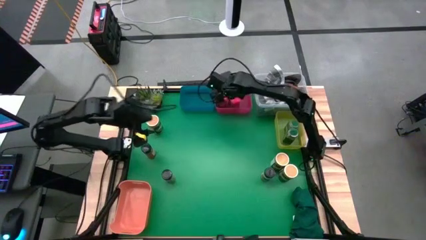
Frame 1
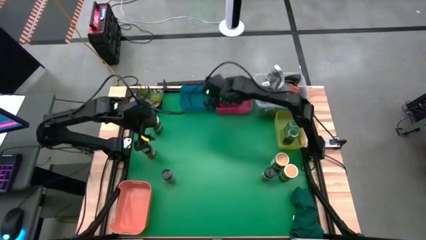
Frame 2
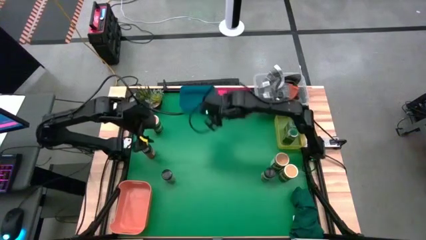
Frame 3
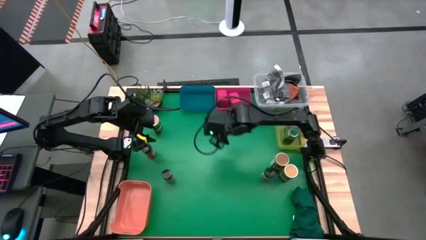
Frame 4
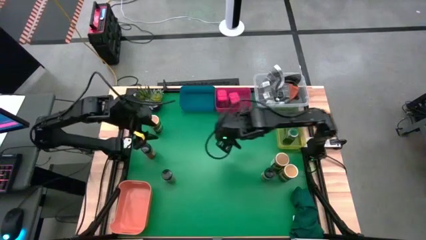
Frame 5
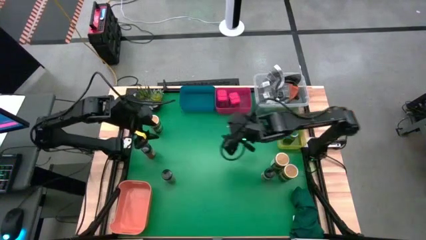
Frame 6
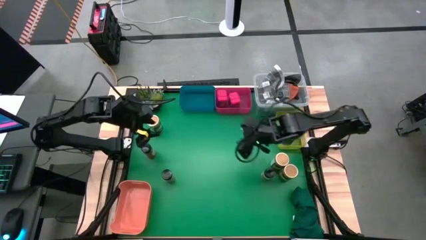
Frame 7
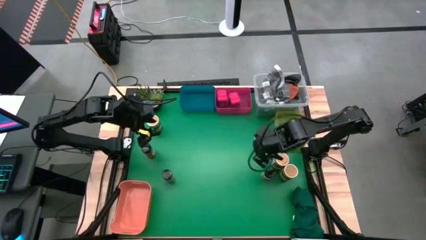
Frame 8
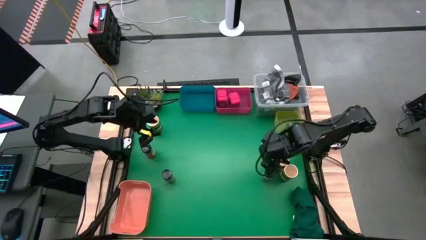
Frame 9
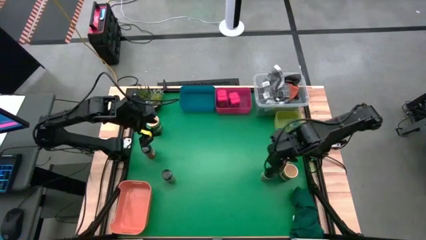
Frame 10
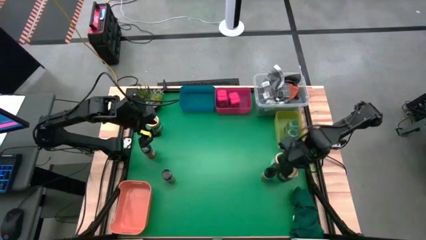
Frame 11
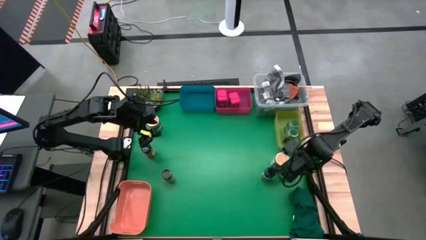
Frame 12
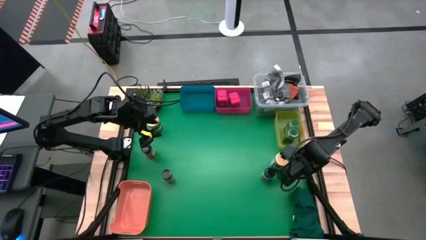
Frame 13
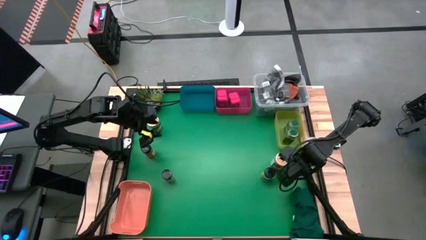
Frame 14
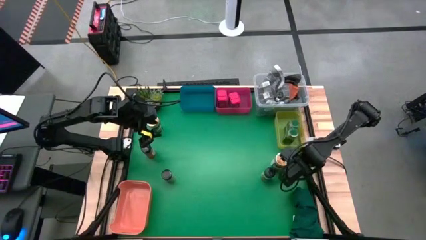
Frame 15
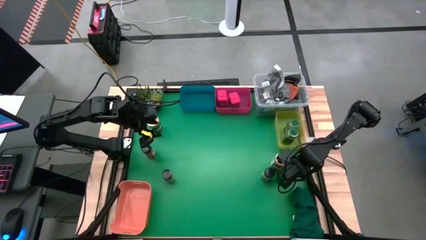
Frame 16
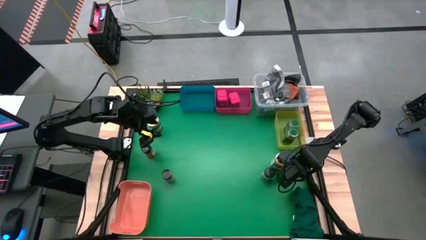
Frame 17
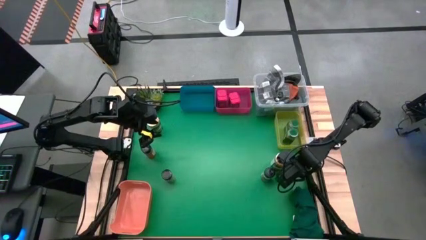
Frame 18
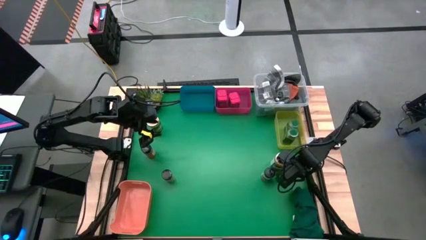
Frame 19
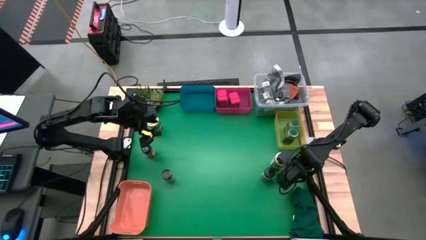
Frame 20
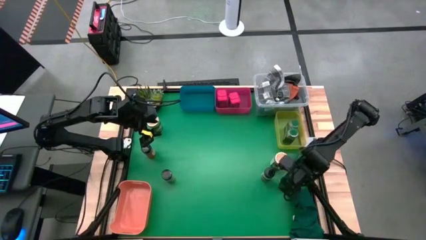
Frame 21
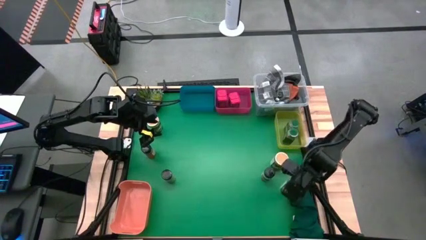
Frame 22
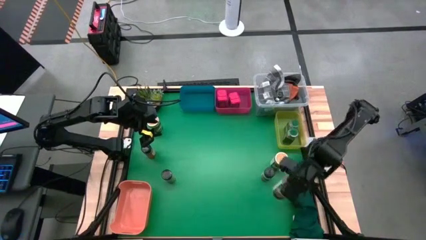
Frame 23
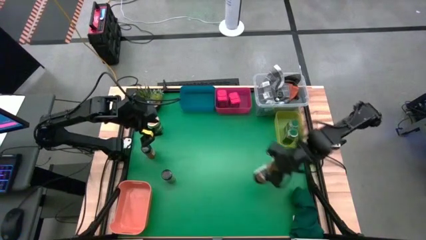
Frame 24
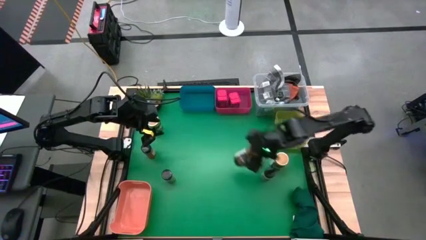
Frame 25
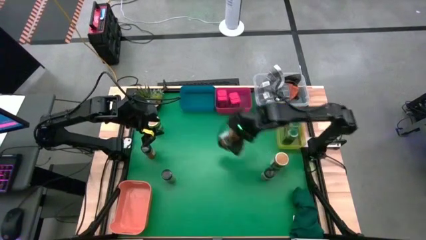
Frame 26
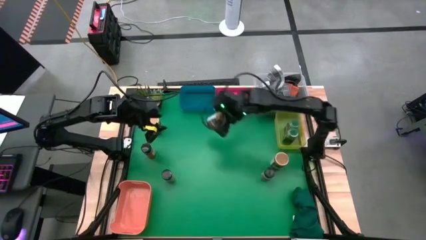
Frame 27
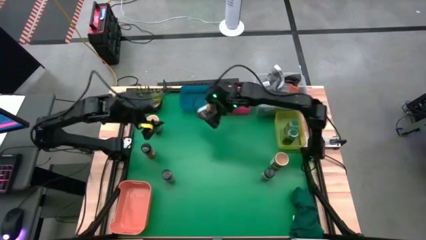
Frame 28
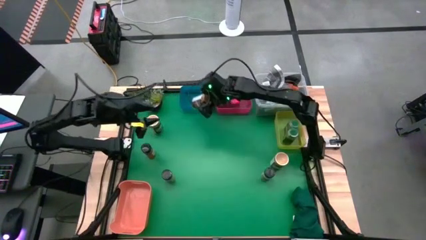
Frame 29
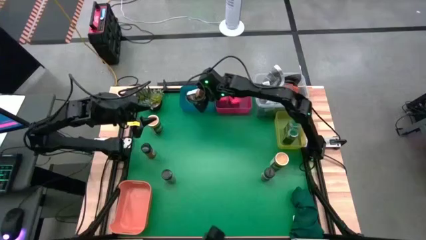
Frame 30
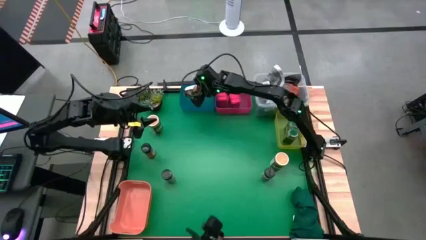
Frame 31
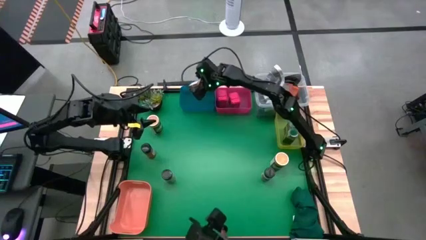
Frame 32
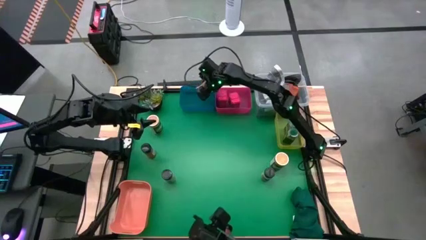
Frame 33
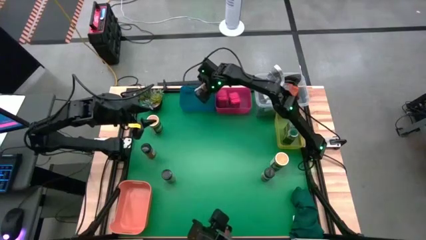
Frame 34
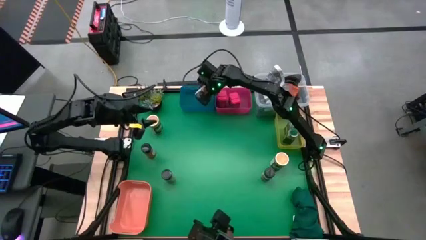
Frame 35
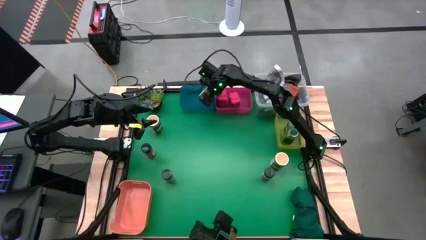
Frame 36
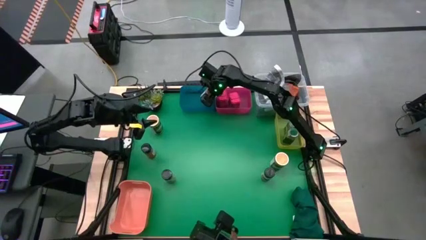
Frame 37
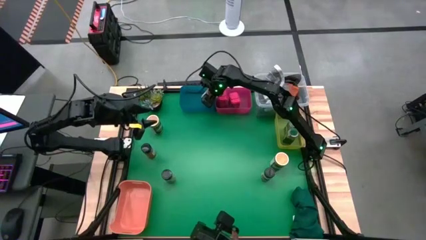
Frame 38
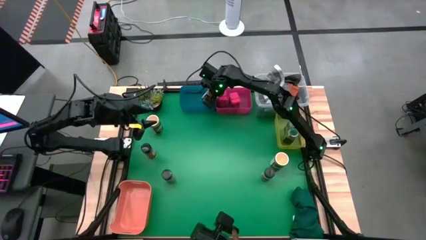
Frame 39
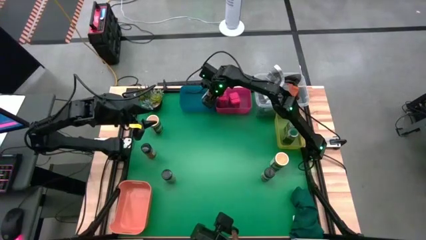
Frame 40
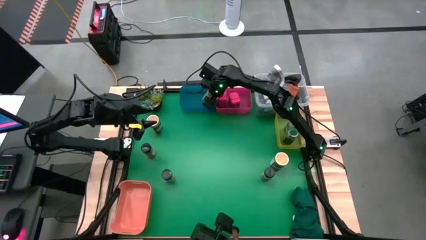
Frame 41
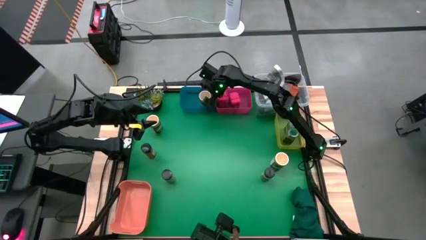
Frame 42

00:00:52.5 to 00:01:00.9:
Task: Sort spices by type
Put the bottom brown spice bottle into the blue bin

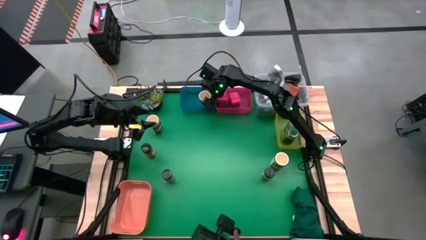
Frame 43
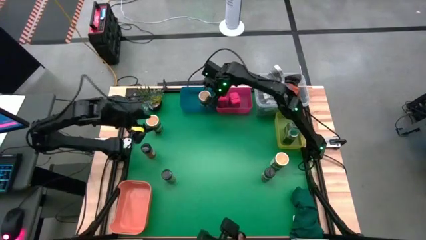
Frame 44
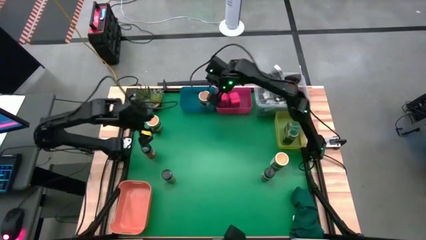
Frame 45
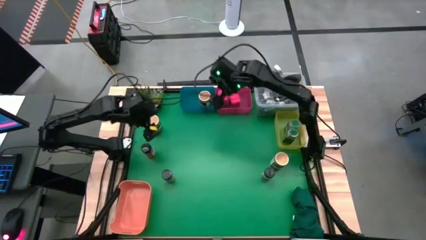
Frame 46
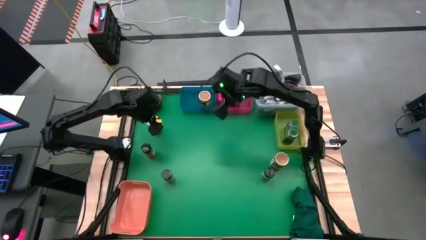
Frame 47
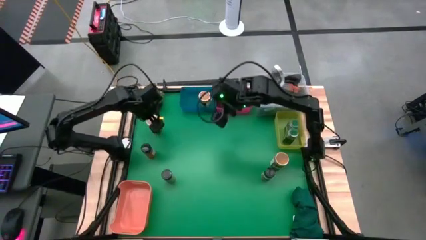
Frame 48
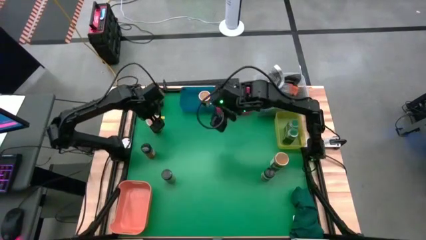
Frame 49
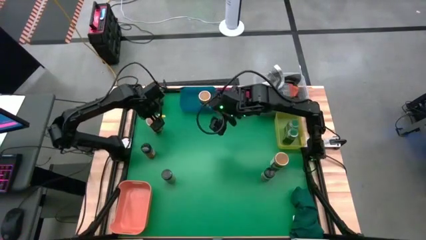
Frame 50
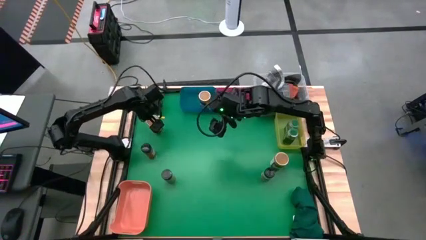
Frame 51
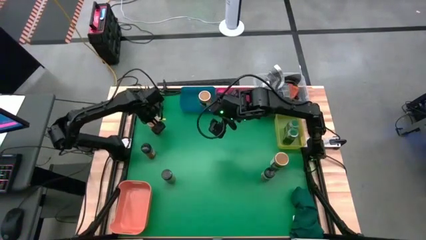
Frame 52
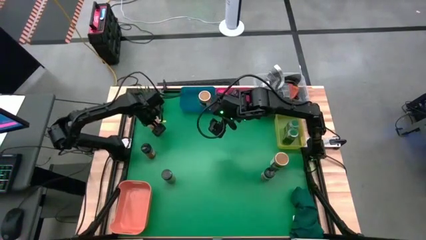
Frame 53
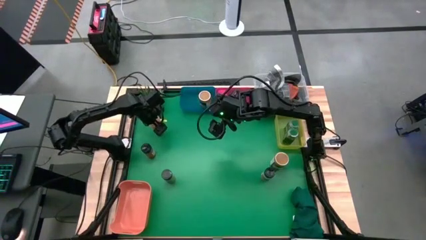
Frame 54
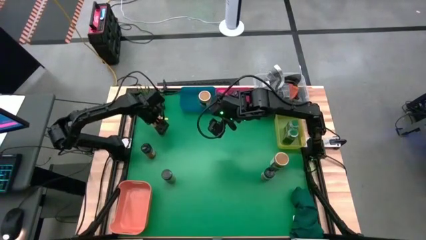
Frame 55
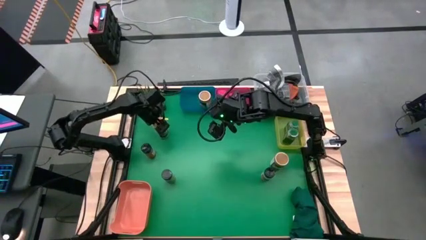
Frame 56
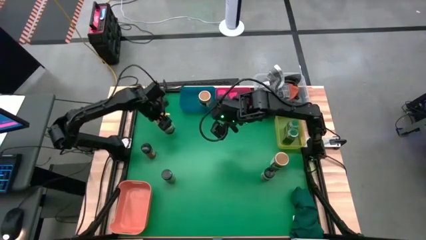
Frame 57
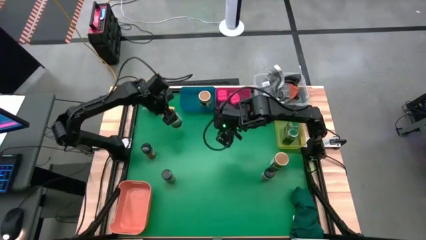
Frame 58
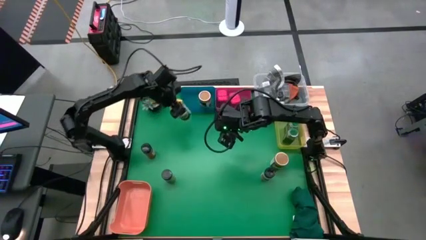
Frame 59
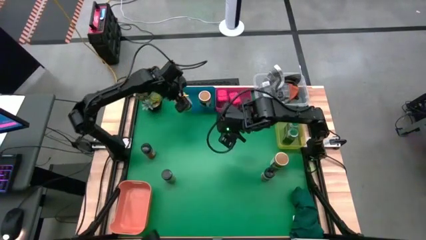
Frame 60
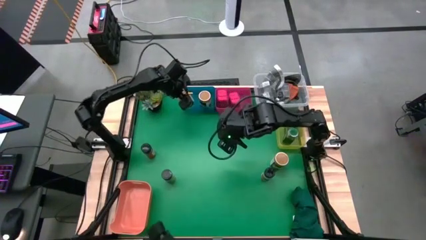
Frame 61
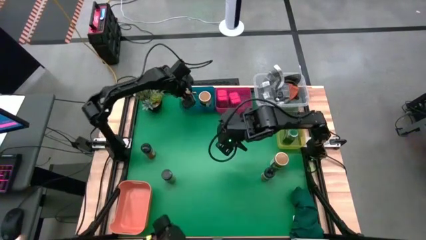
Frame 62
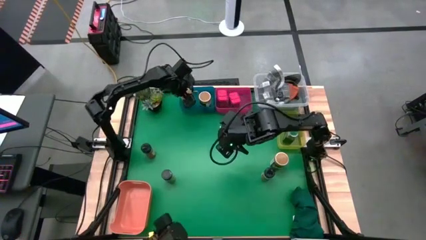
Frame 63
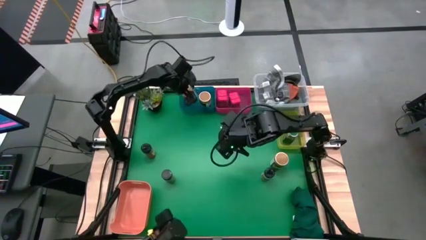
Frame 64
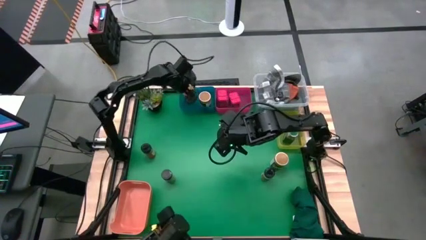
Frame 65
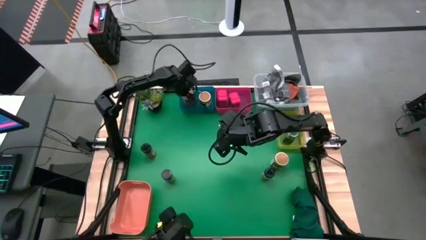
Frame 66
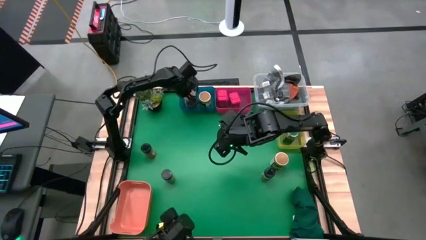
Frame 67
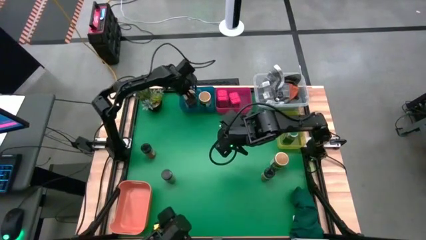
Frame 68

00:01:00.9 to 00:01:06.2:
Put the left brown spice bottle into the blue bin

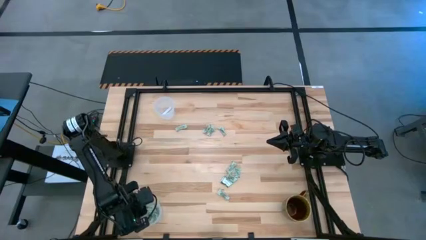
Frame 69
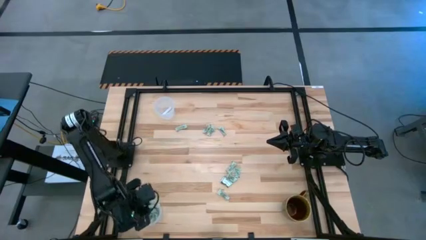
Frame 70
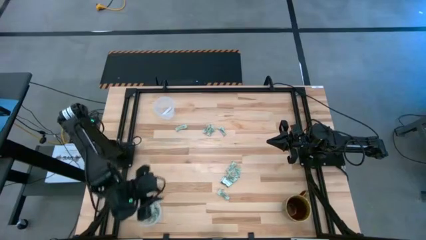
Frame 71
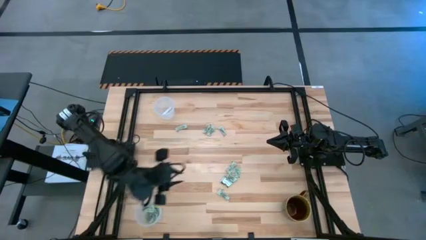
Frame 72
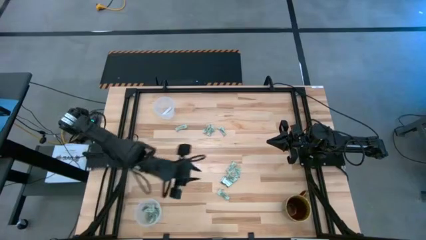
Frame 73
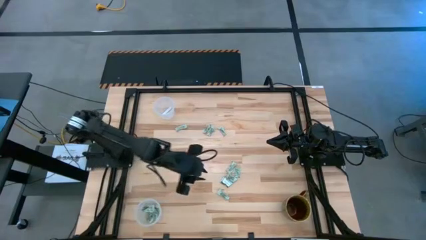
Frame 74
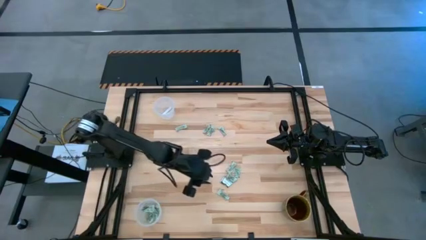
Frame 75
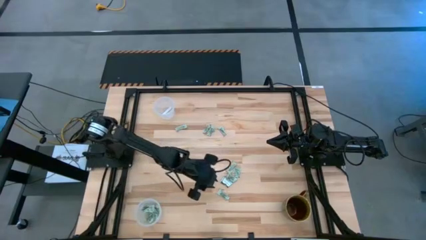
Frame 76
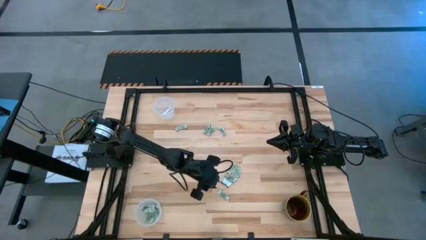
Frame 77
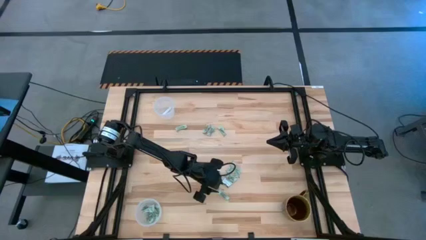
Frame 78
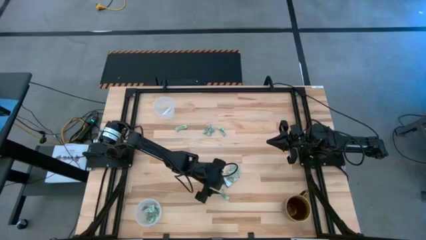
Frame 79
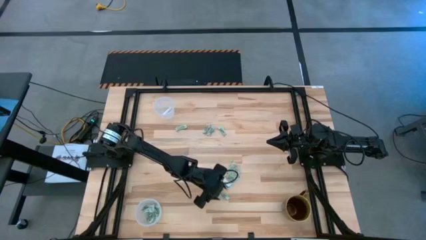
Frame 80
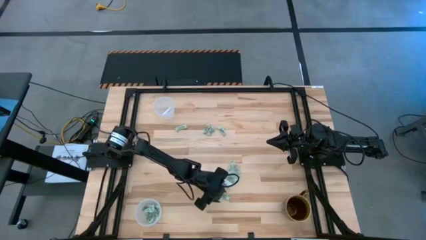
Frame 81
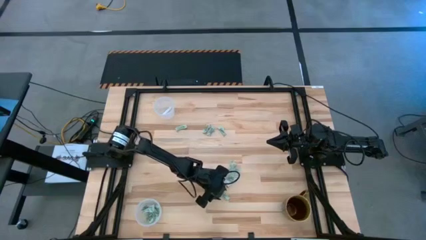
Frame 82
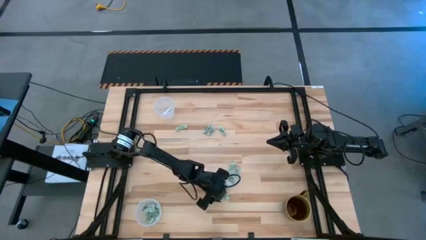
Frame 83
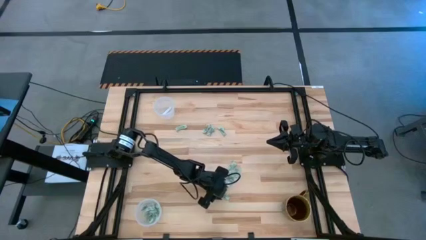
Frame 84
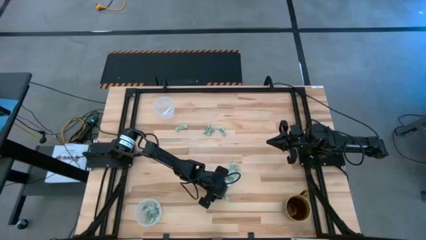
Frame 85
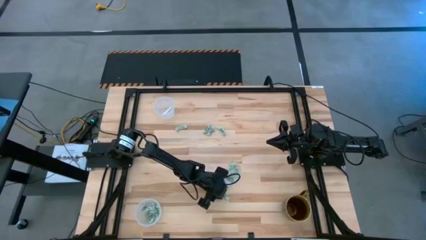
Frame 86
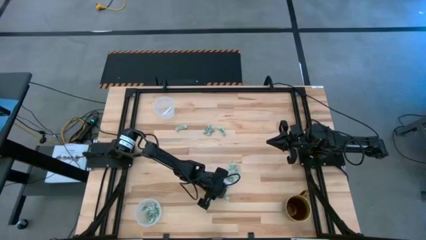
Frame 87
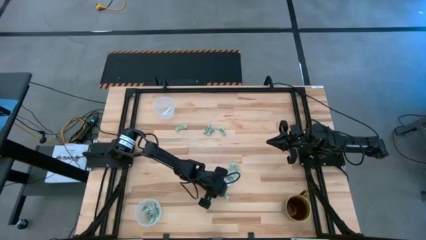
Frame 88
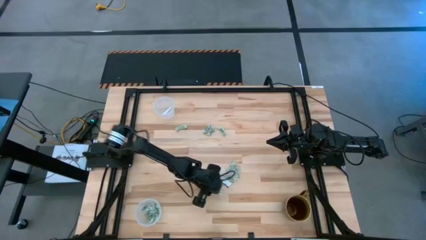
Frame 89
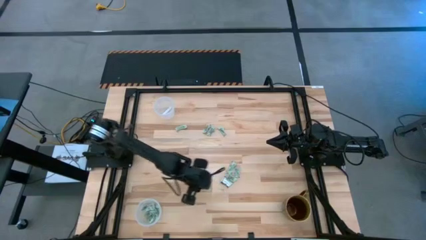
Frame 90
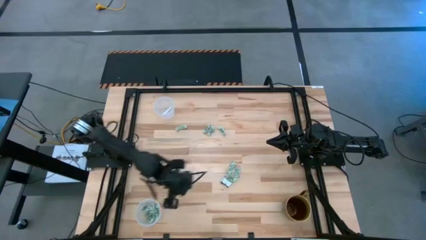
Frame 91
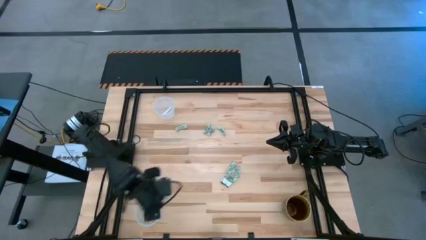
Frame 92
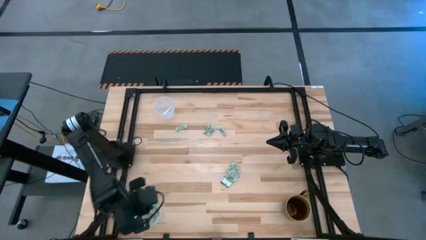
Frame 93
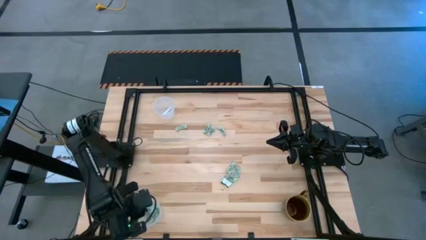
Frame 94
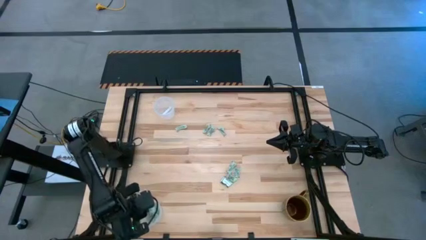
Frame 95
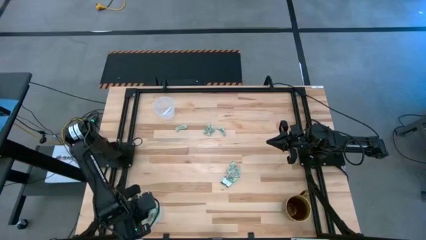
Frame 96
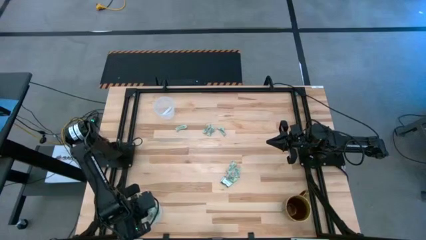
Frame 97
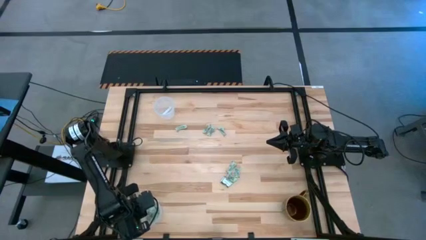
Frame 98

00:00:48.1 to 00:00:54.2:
Task: Pick and place Stevia / Truvia into bins
Put the stevia packet into the bottom transparent container
